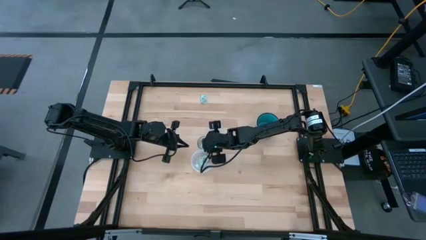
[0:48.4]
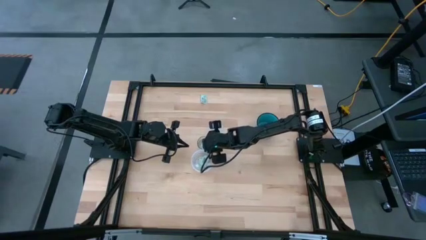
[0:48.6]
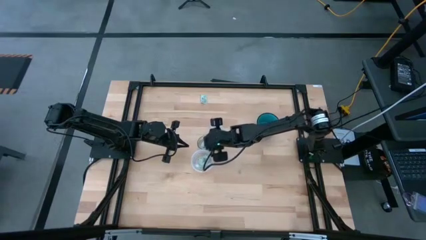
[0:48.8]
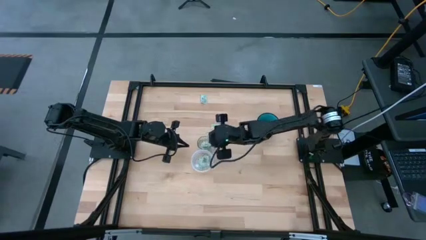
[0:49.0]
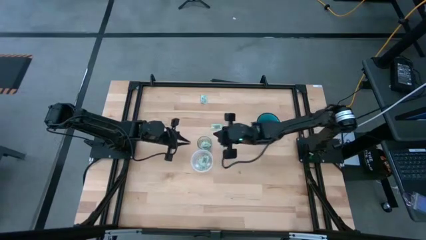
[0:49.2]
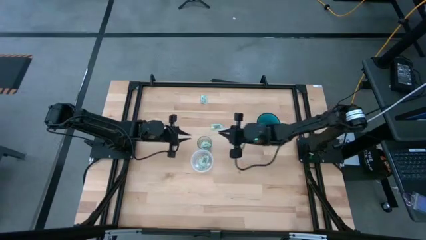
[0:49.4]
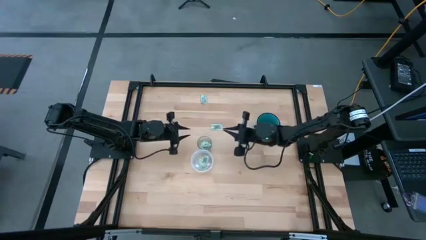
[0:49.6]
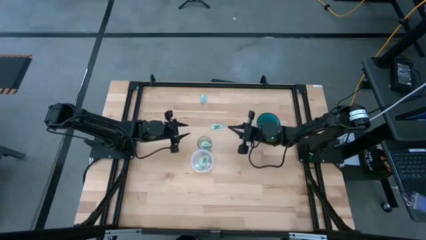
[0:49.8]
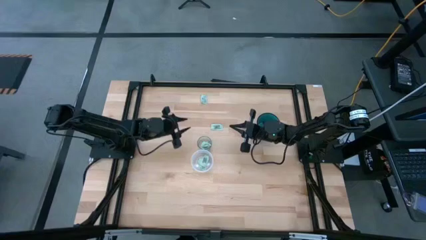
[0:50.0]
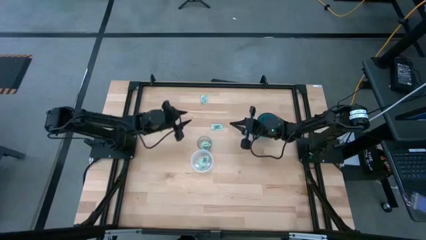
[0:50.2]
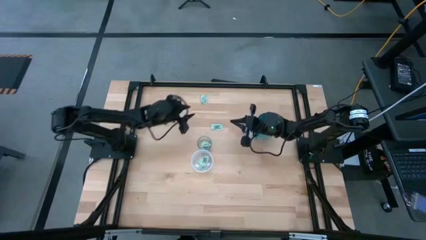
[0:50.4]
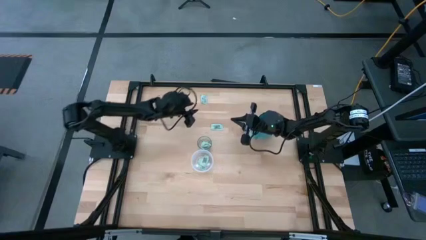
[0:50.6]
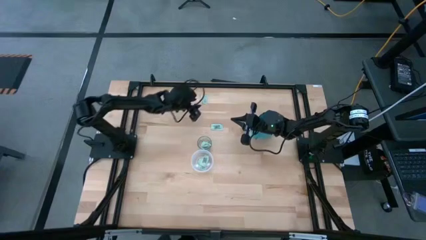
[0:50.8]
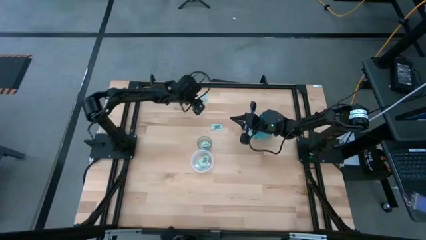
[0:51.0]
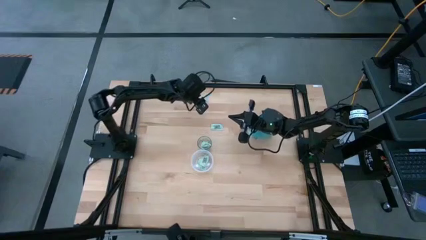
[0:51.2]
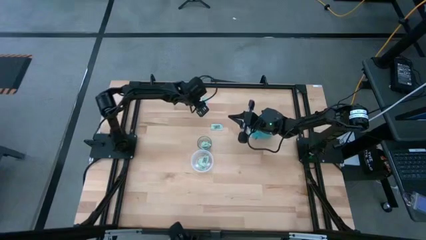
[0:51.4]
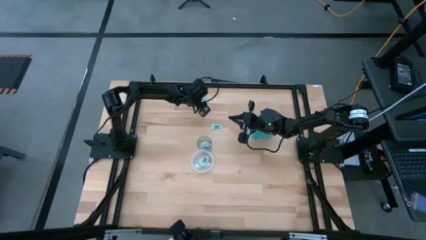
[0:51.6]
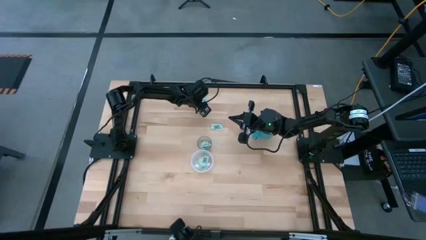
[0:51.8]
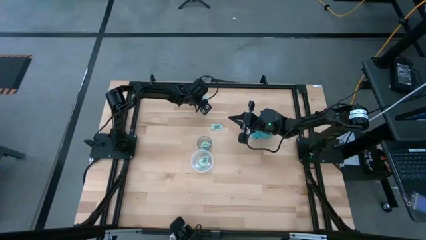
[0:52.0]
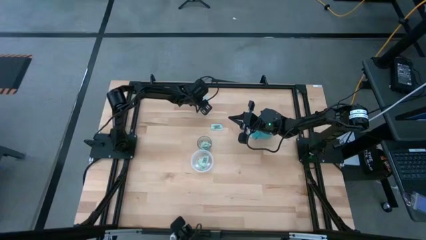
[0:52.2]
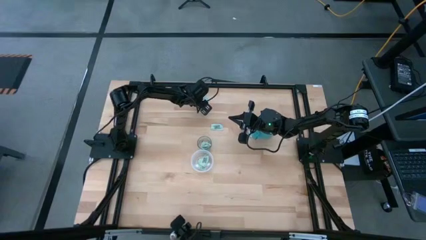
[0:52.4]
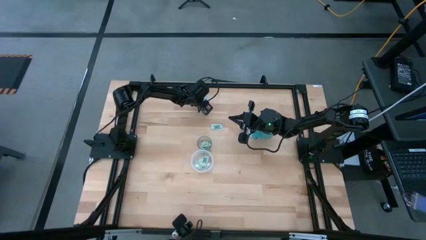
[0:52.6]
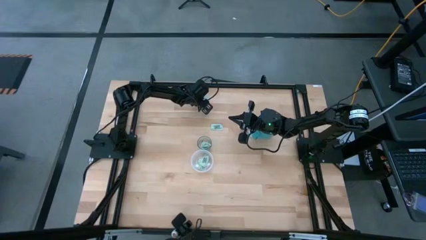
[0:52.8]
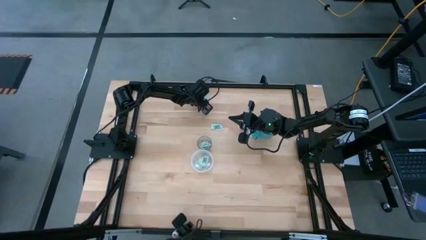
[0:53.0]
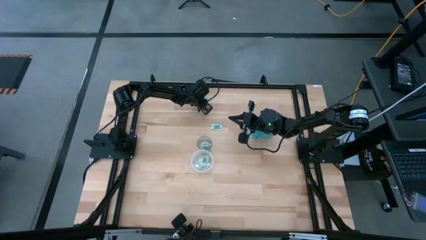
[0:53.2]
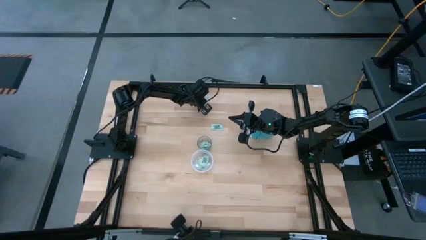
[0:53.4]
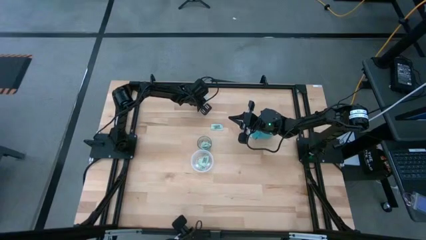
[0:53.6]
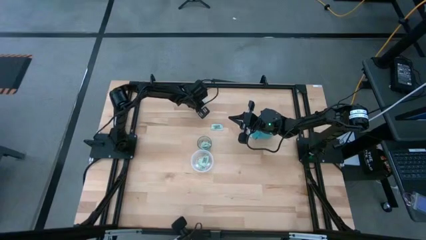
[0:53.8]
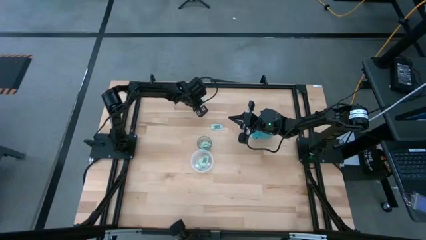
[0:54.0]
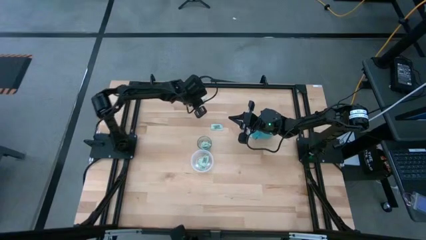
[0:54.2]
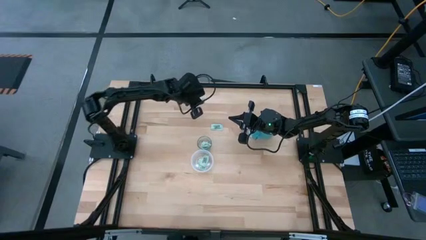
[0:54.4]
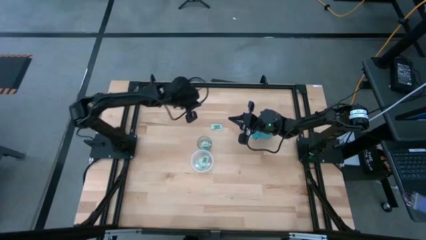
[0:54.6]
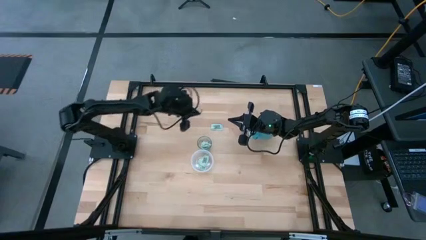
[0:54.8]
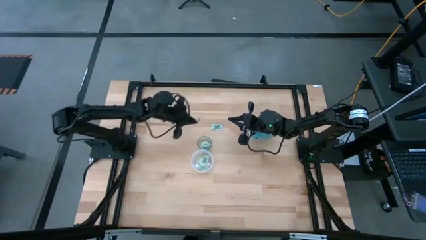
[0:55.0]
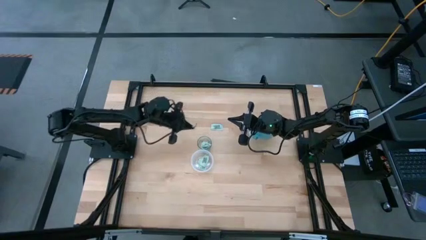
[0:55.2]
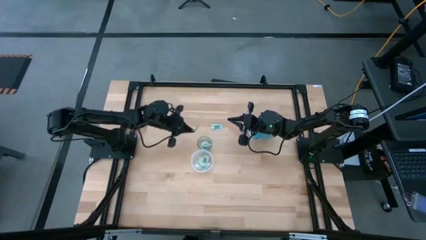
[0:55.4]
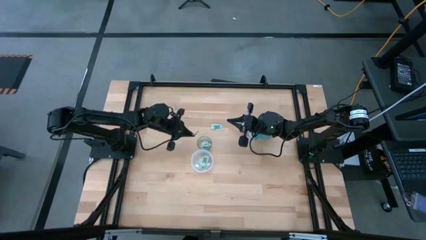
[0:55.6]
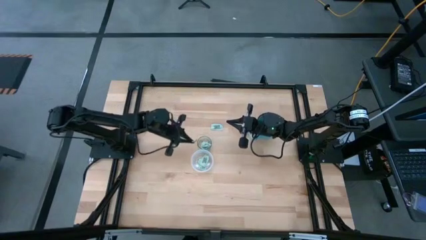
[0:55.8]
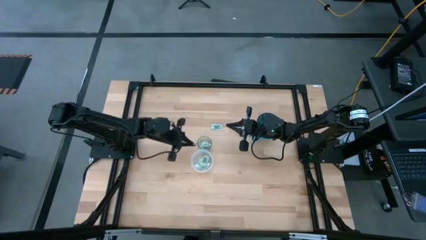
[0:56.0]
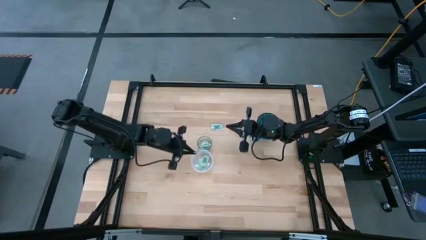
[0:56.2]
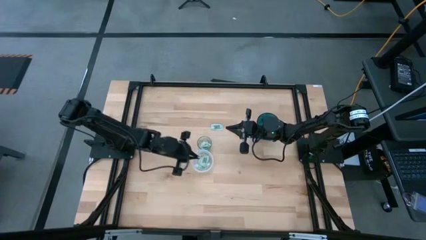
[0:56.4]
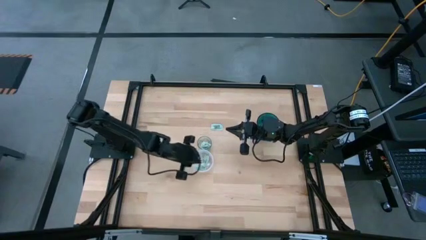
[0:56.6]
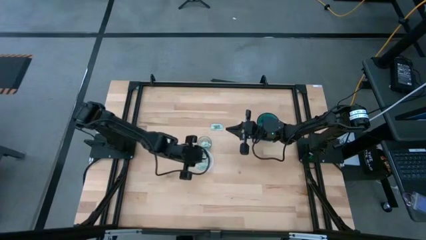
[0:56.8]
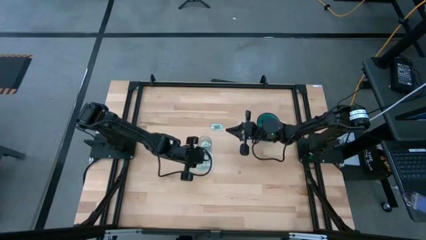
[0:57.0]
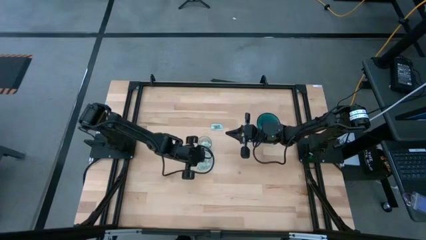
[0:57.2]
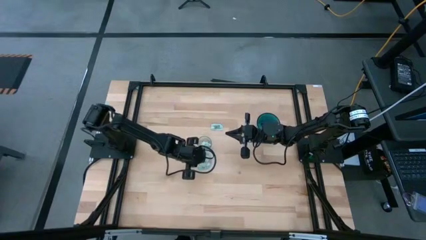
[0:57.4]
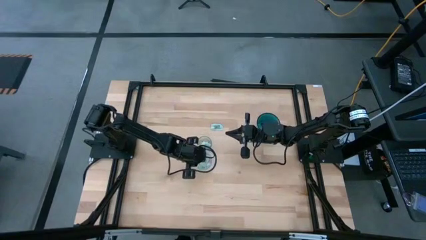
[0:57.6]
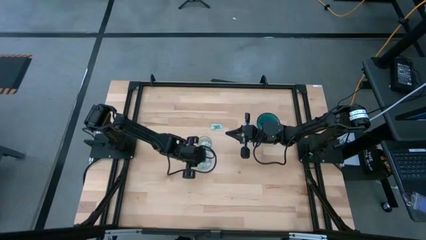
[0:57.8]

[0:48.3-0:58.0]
Task: Pick and place items into bin
Put the transparent stevia packet into the transparent bin
